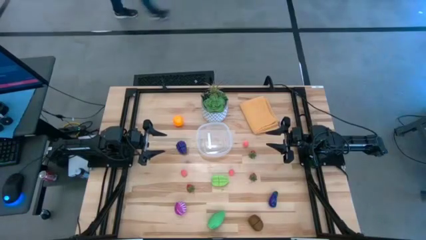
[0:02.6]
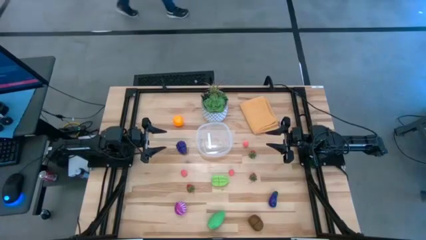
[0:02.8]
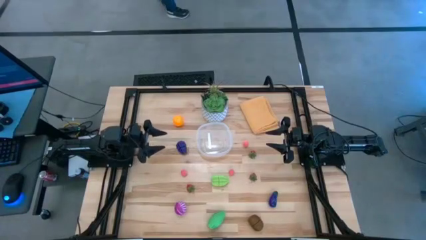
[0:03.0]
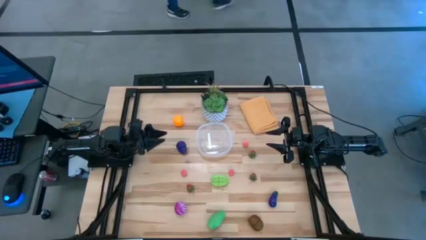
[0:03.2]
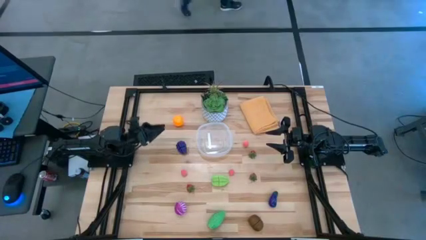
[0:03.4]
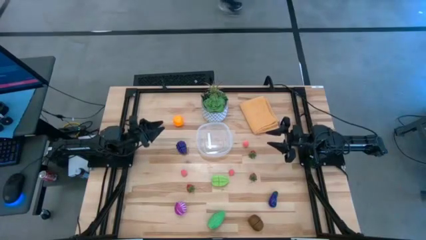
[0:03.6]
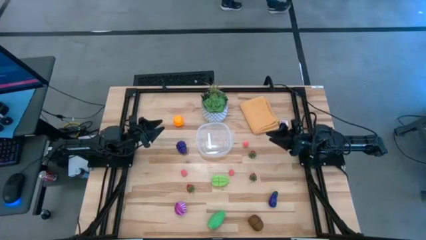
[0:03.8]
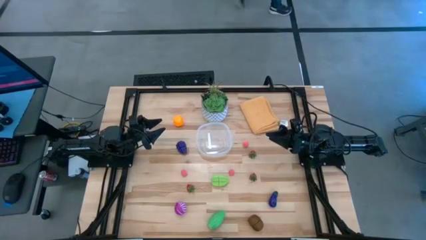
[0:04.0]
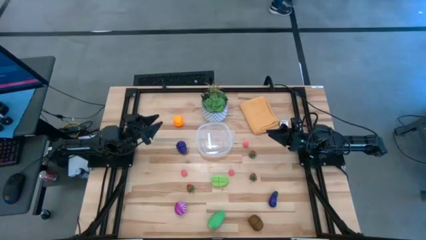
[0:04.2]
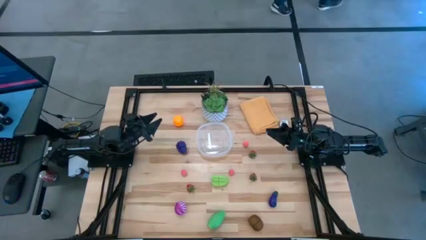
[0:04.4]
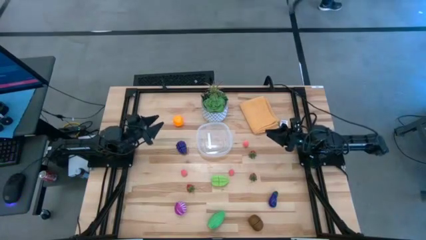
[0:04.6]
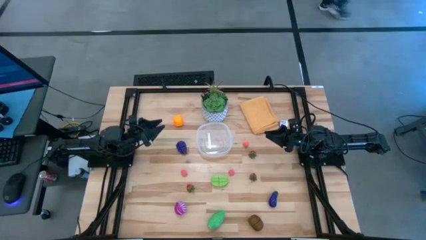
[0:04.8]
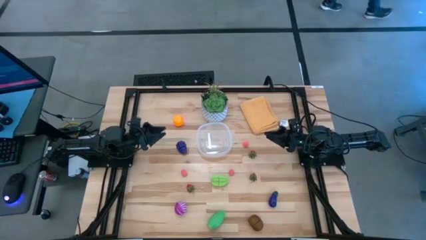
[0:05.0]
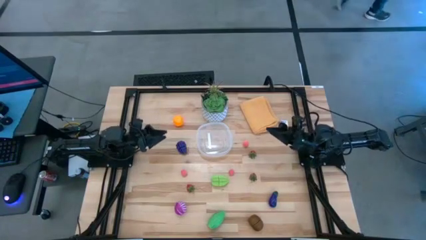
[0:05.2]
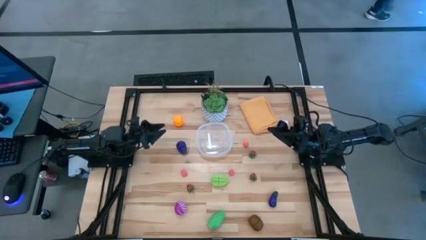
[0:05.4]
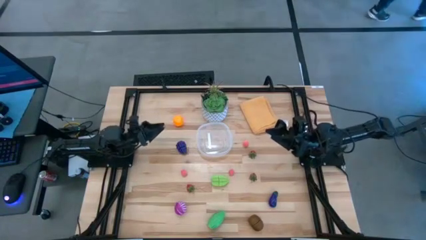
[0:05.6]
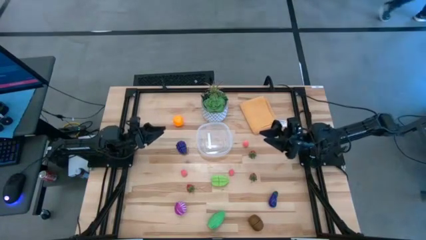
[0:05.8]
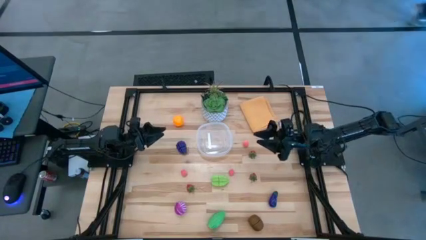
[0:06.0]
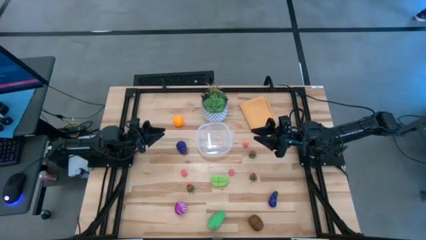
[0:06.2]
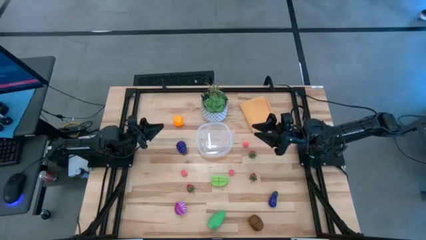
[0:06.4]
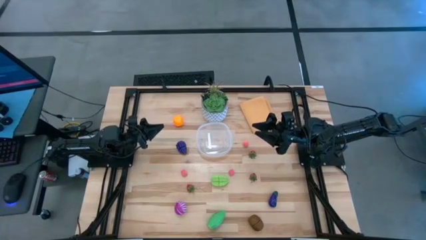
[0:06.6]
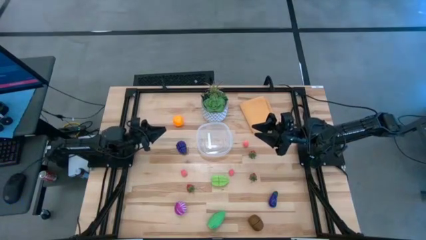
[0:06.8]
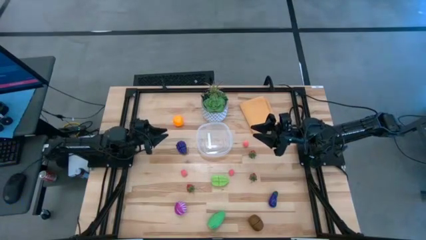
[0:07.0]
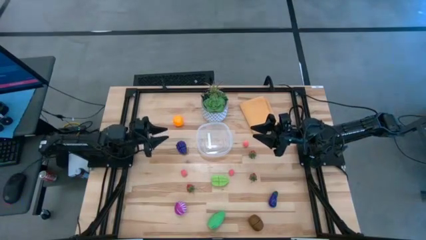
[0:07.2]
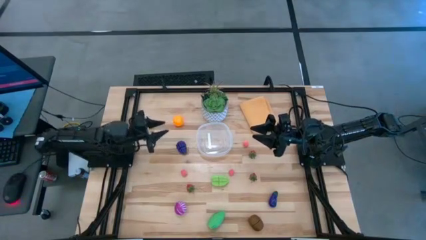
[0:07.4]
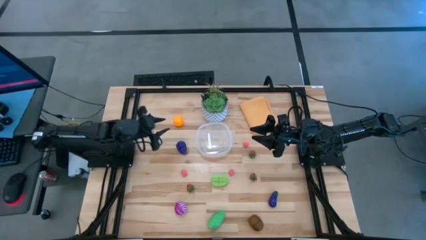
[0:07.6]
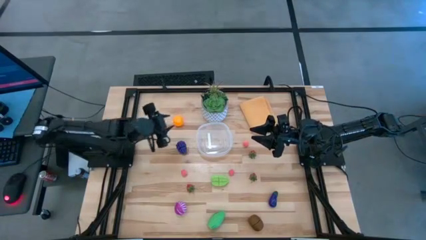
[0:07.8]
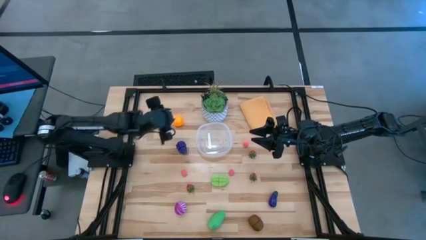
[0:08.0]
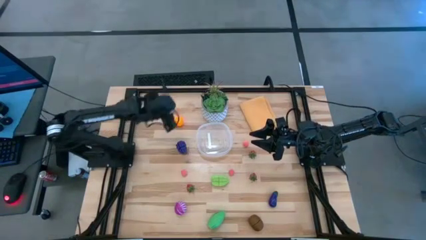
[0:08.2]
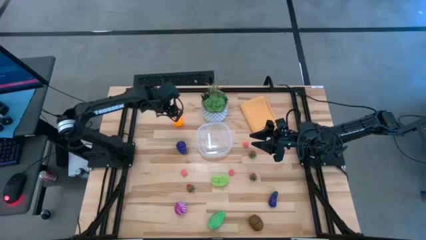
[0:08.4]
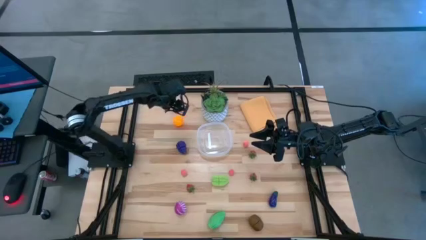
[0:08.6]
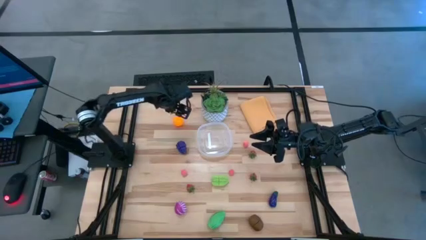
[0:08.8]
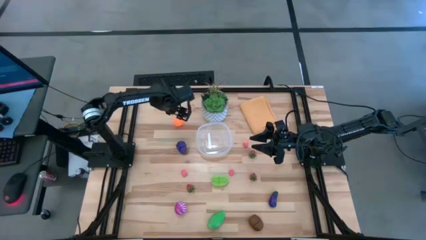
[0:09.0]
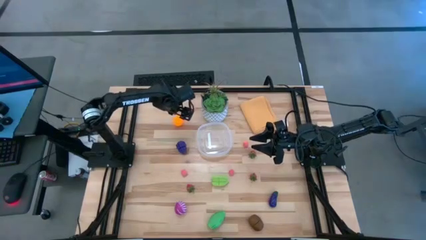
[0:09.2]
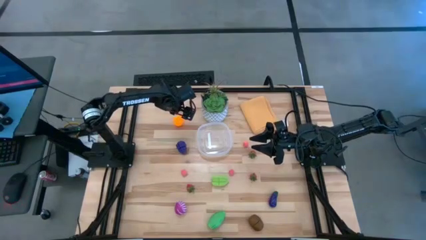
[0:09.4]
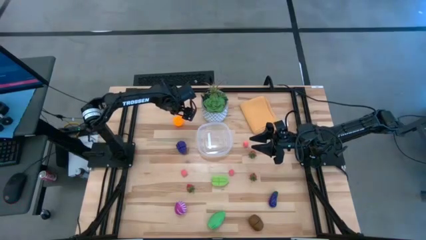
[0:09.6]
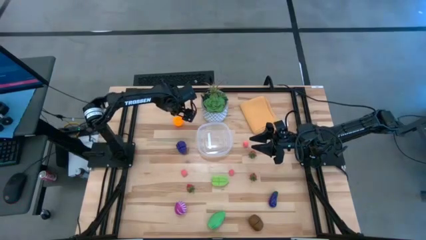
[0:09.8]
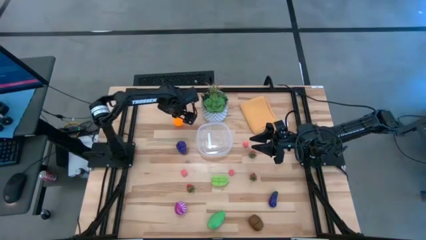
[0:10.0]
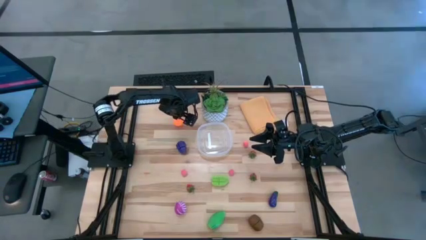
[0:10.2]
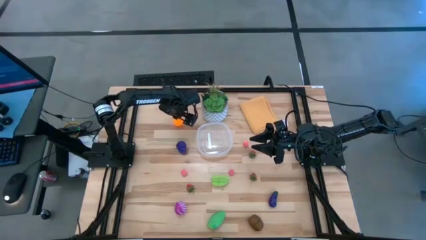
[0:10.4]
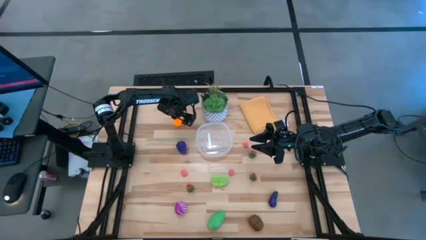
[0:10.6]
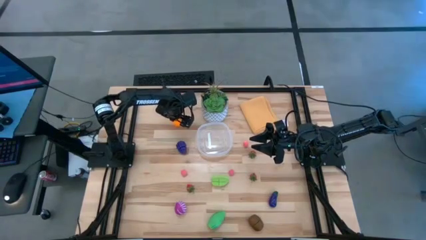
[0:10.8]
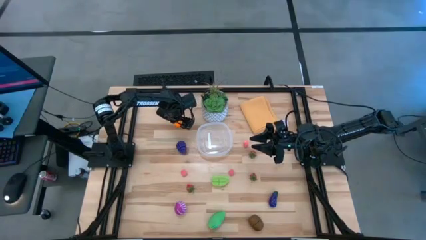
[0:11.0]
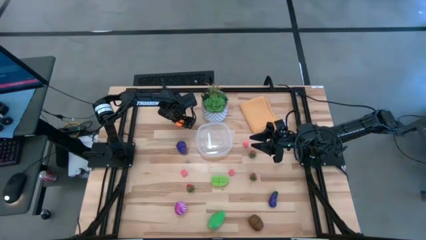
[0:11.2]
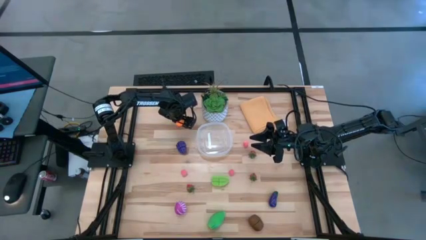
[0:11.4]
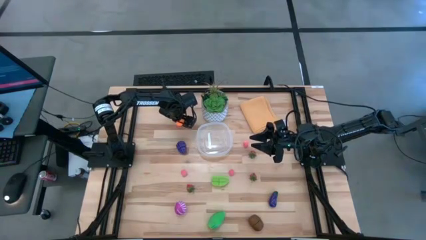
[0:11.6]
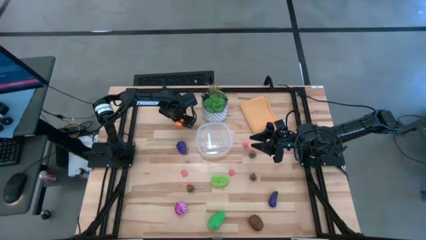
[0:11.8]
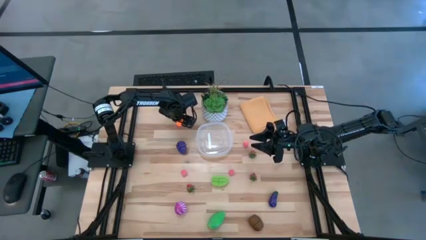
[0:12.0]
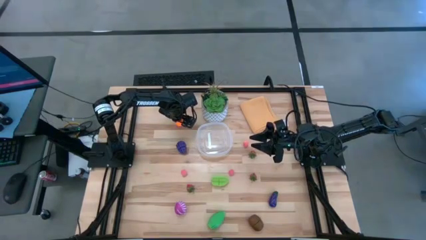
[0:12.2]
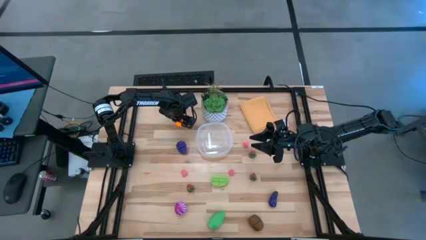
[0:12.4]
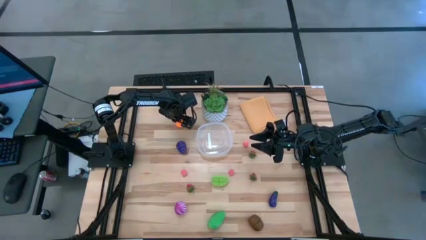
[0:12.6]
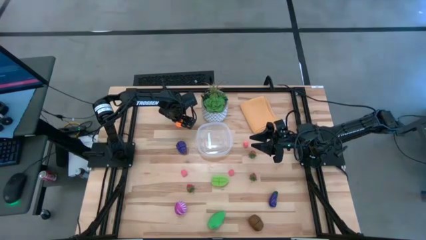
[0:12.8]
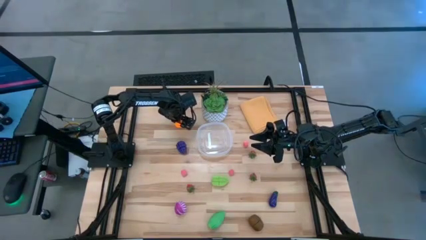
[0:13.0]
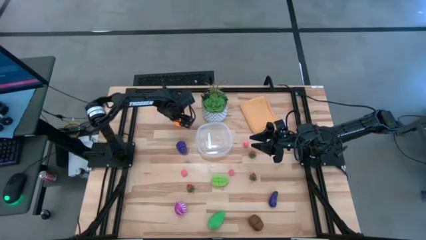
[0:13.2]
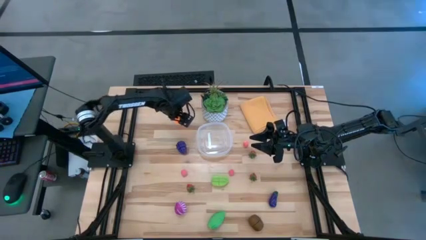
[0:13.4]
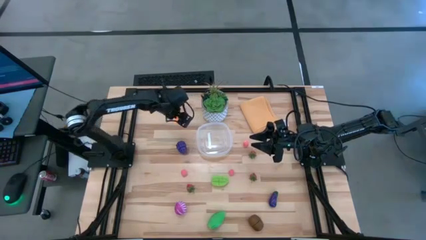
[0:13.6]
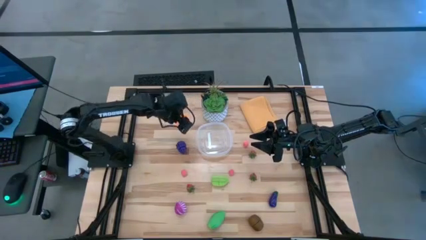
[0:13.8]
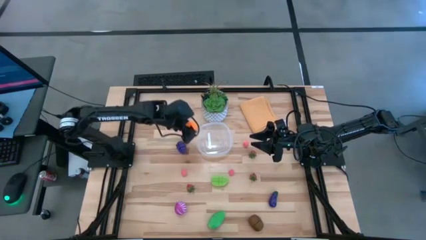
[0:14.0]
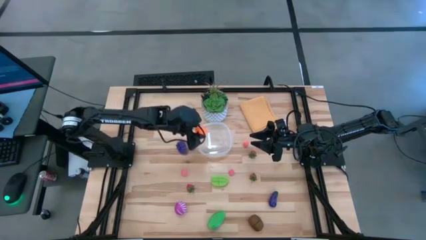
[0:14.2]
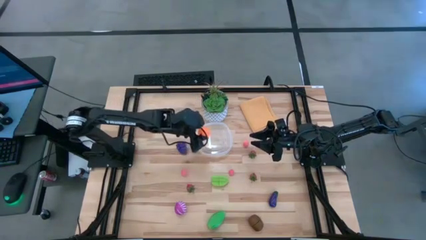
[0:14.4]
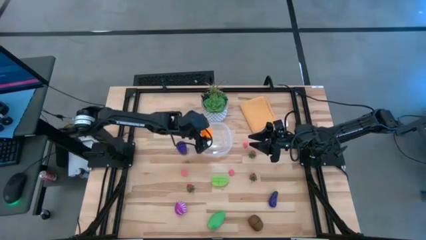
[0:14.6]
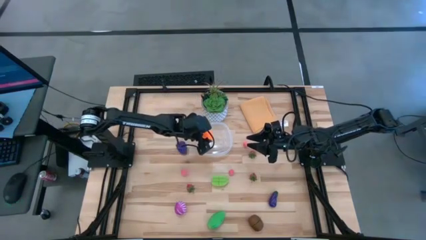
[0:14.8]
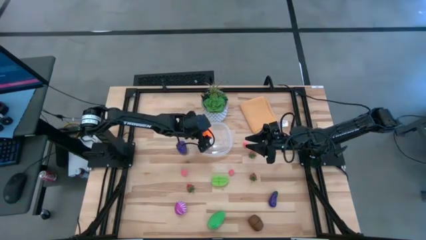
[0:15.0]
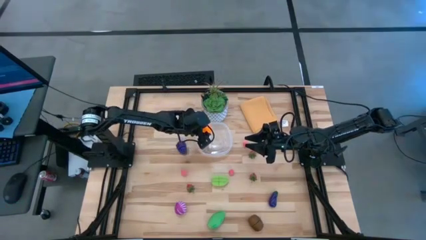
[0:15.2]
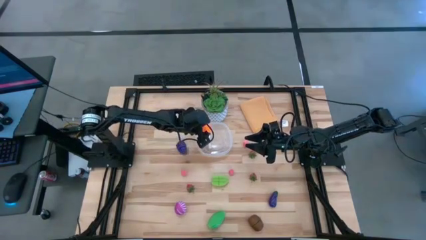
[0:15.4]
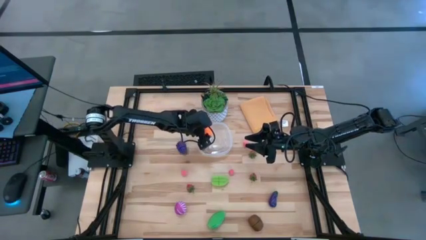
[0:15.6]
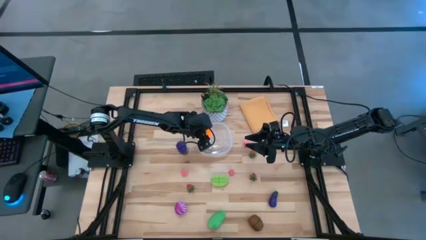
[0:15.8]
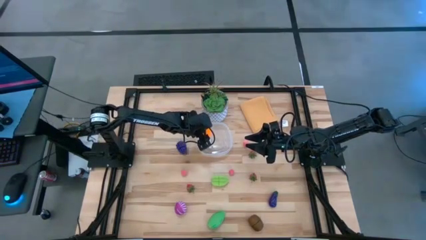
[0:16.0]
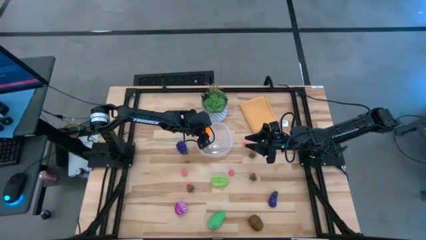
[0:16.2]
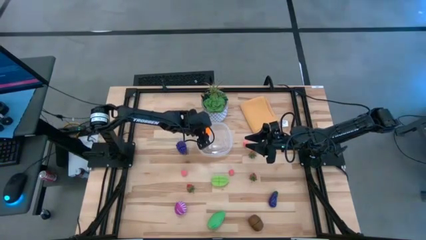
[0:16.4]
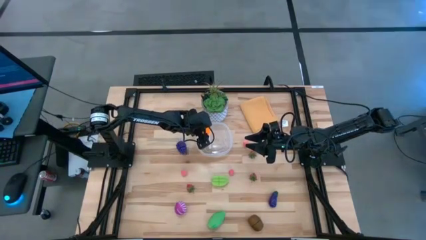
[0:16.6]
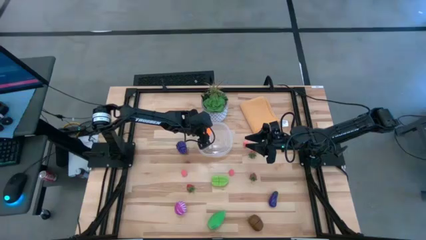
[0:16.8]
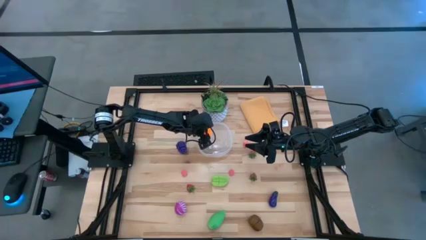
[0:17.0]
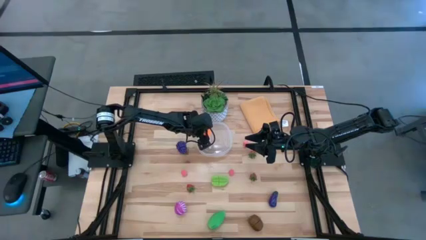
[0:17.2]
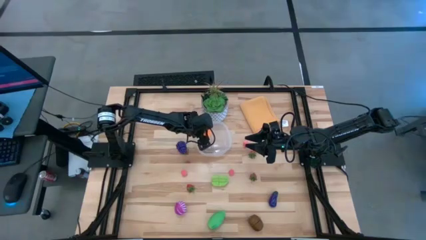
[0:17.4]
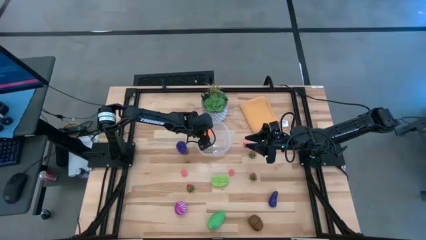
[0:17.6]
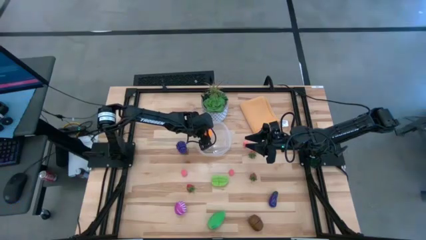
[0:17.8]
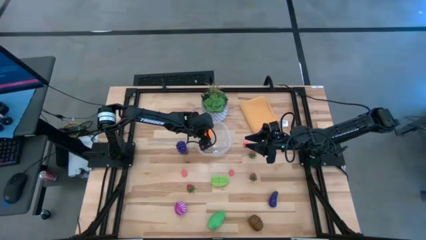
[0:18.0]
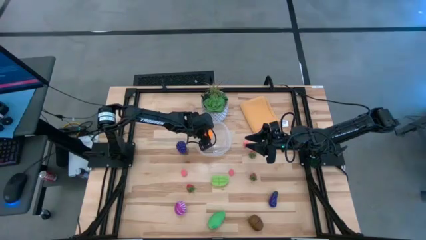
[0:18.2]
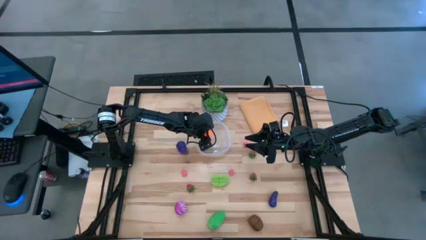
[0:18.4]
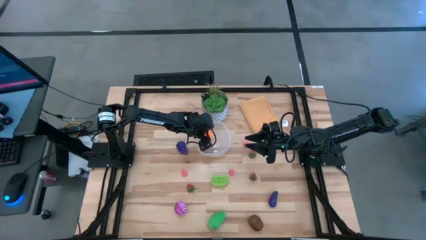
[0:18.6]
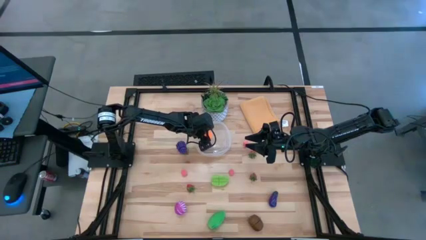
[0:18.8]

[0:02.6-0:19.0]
Task: Pick and placing Produce into tupperware
Put the orange into the transparent bin
